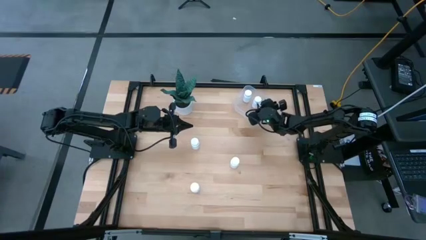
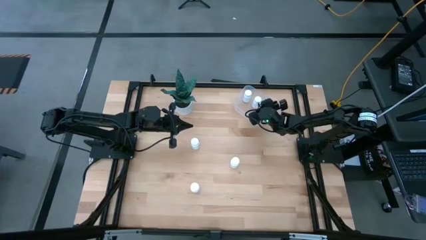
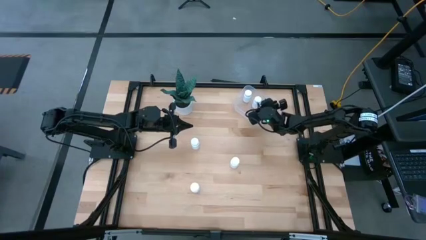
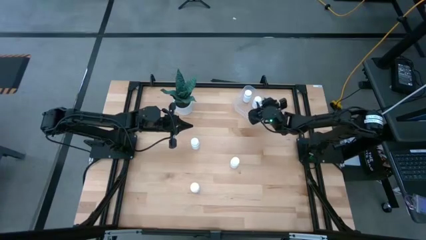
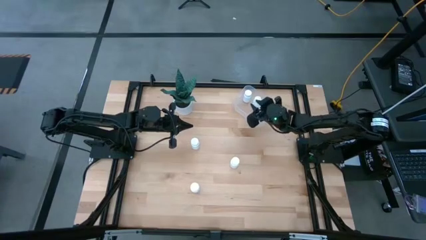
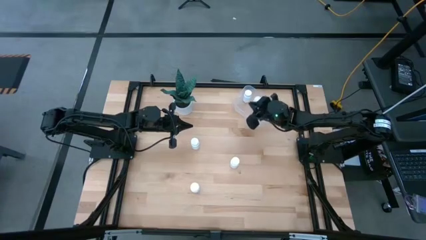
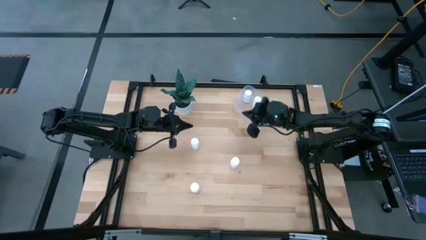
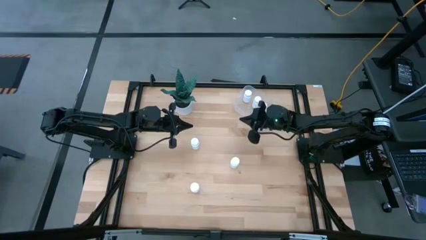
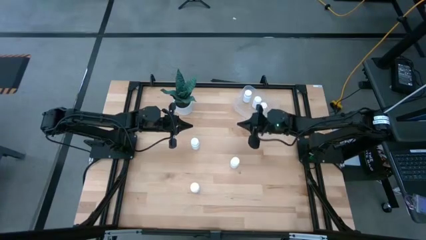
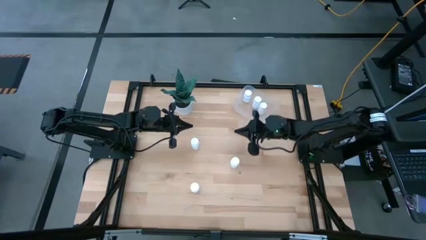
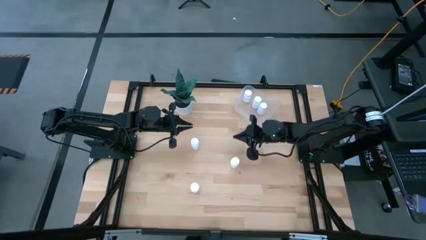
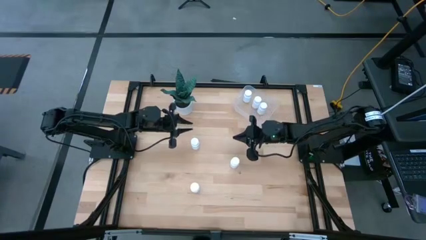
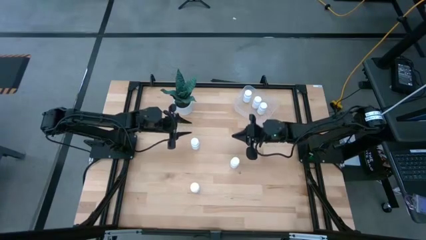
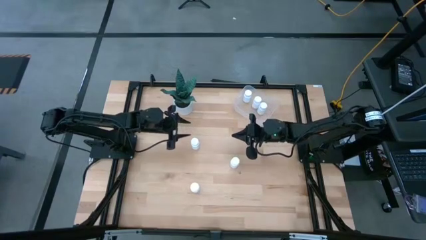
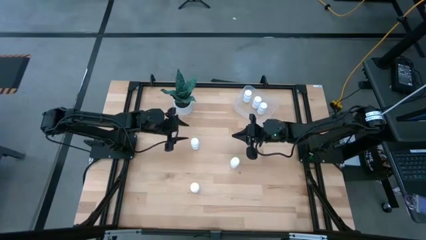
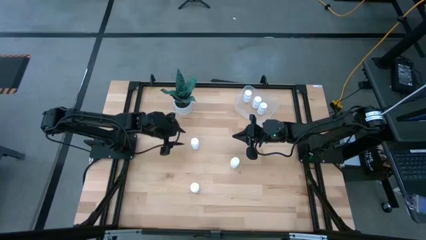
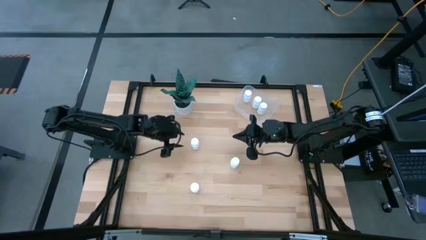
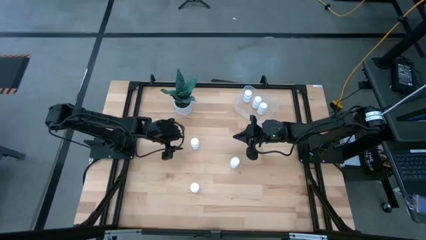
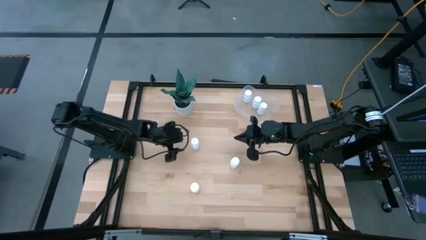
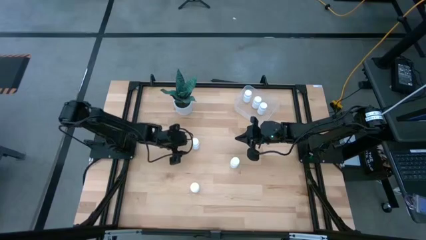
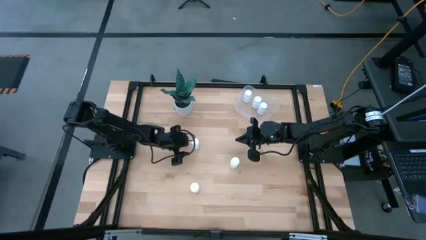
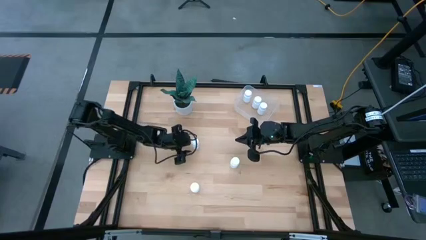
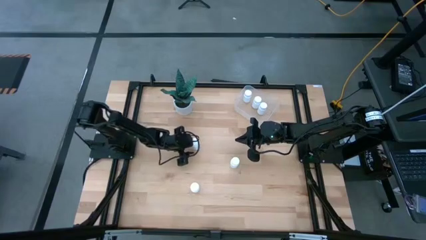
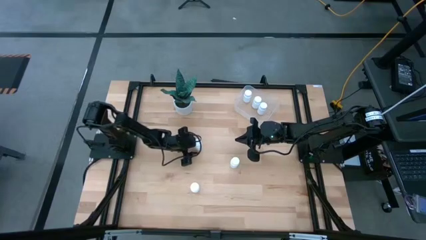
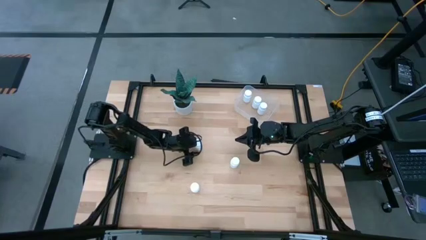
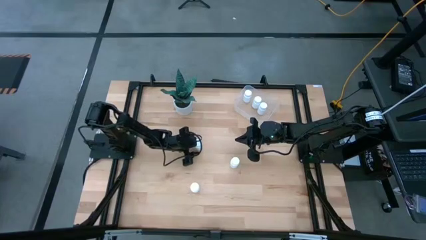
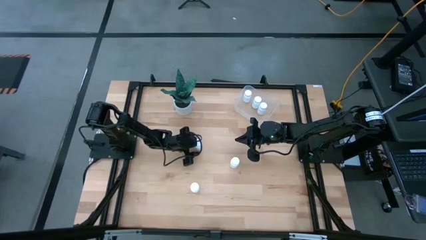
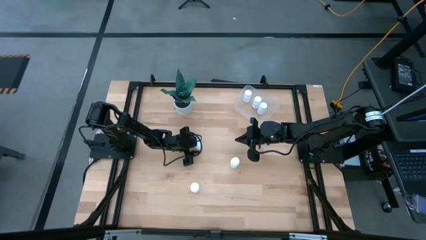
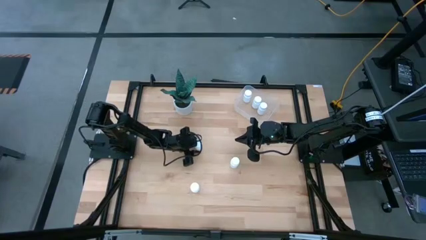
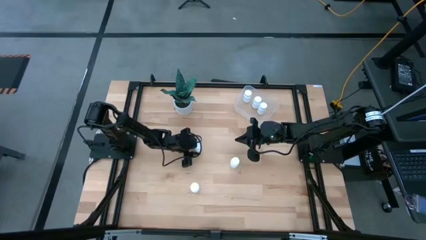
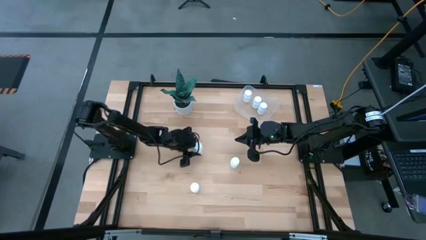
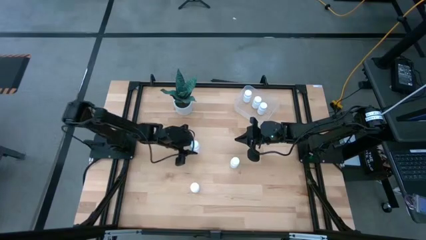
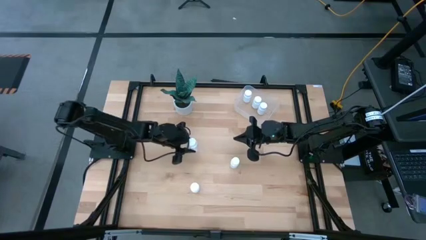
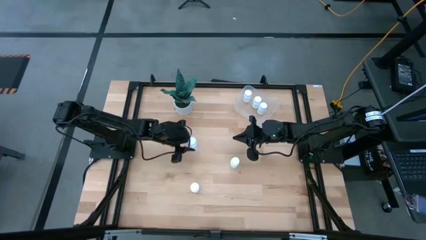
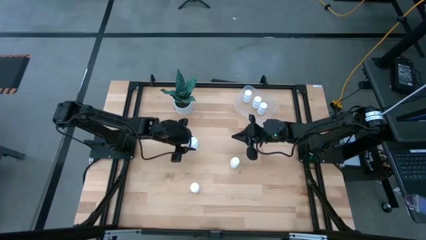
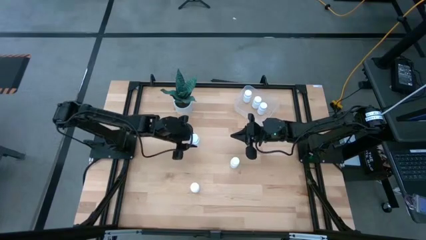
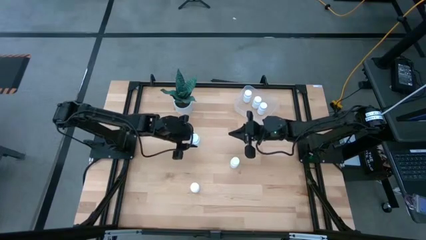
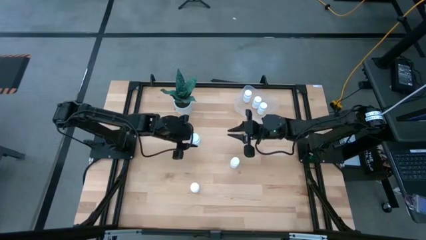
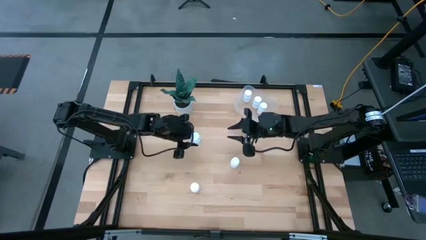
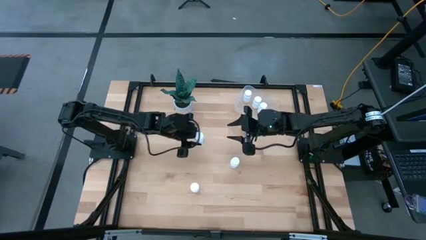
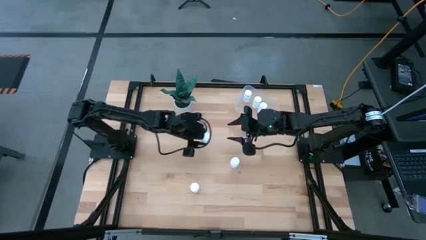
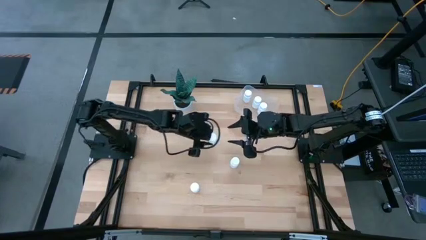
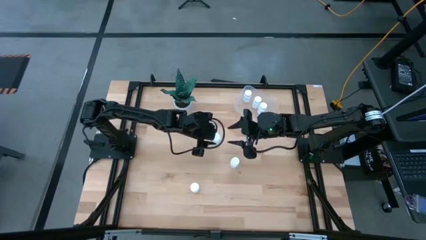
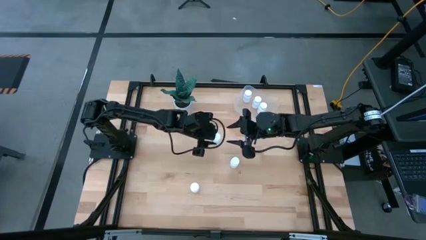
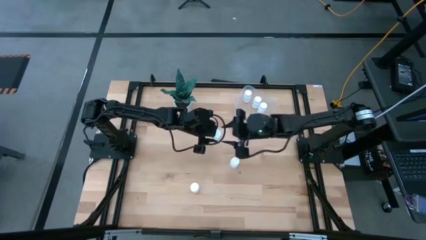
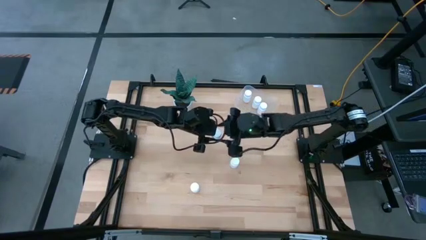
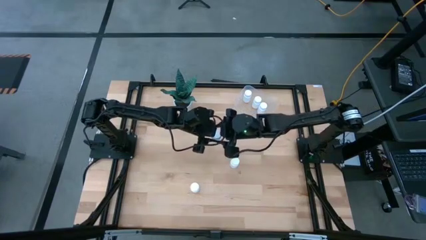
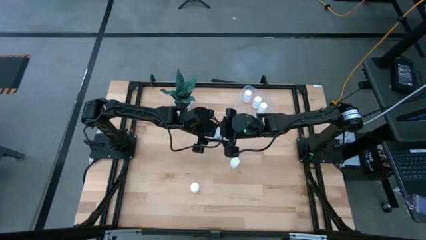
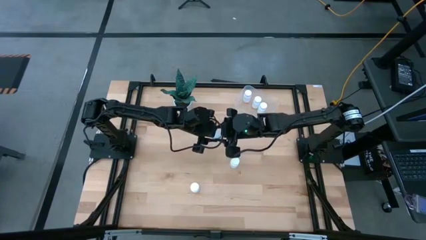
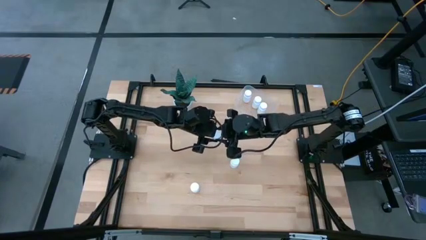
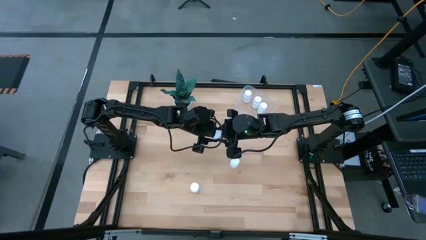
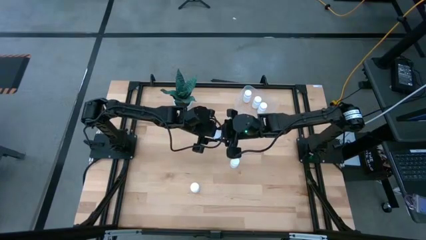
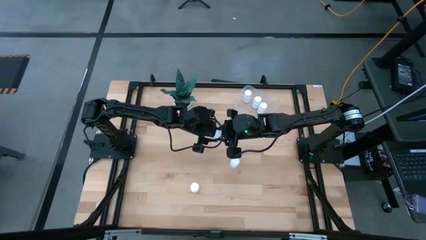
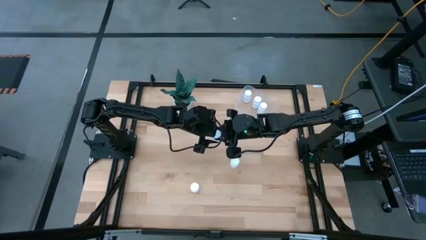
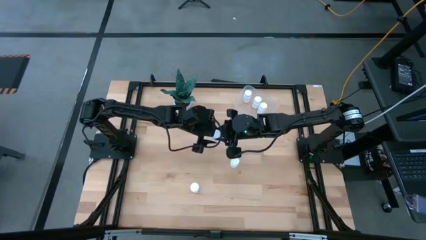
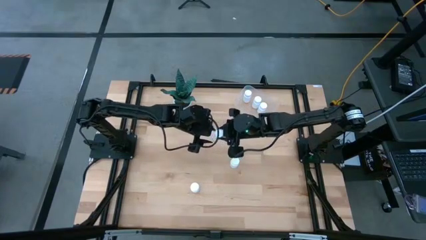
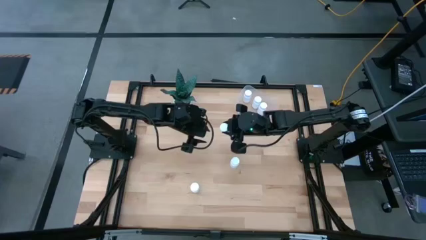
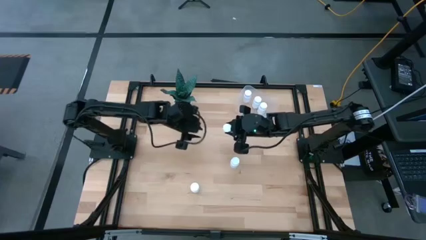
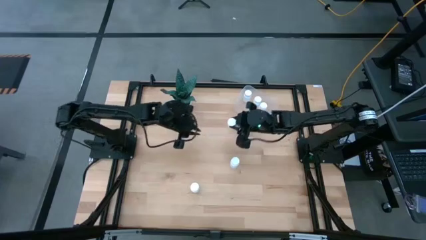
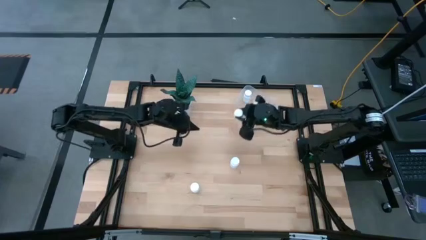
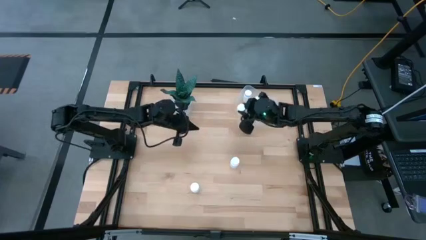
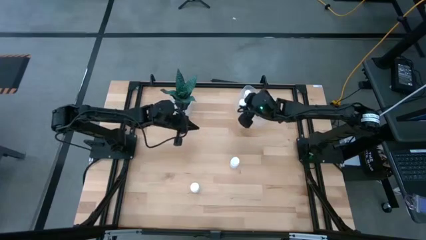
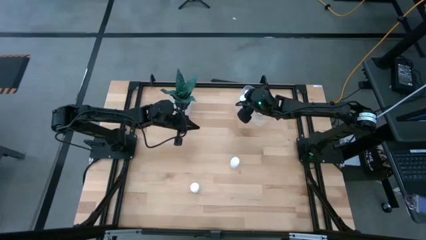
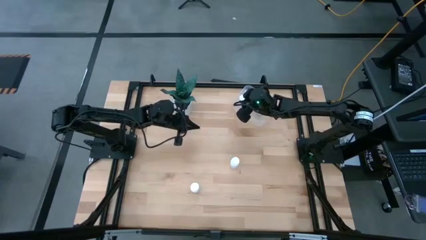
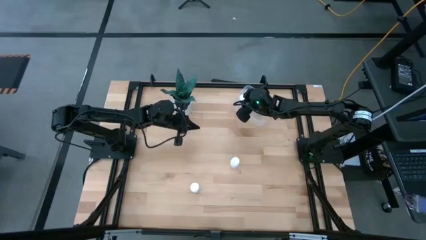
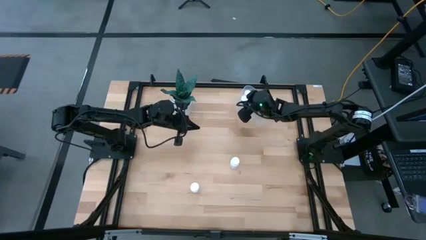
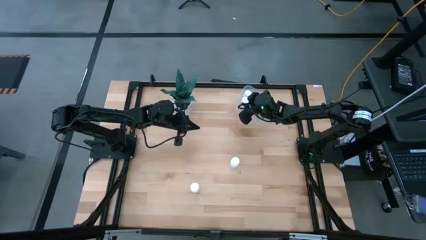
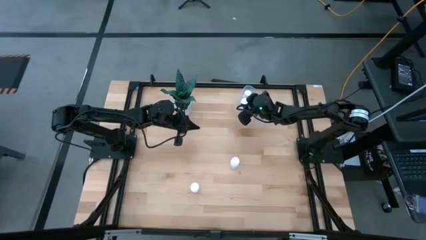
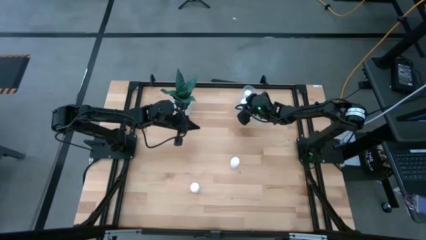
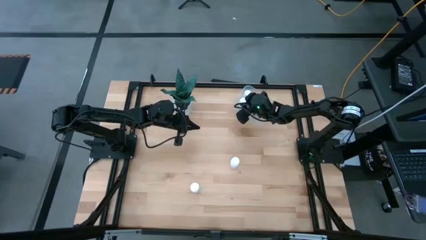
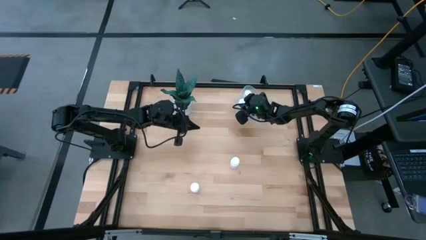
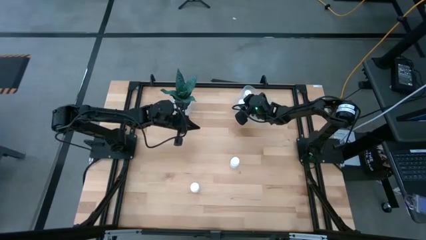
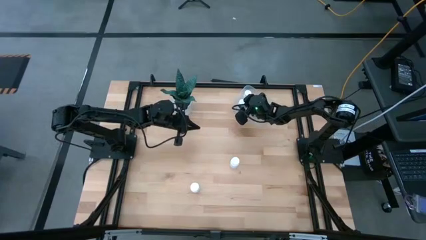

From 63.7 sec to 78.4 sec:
Task: Pick and place pill bottles into a basket
Put the white pill bottle into the transparent bin
